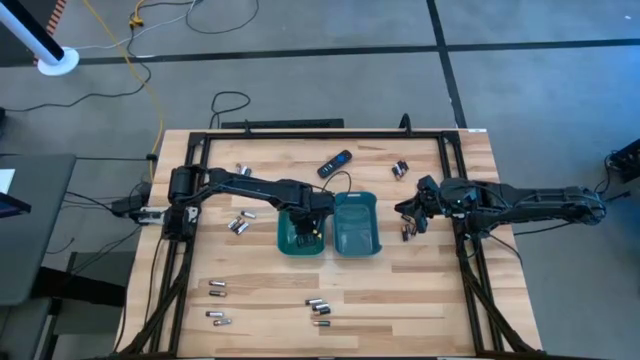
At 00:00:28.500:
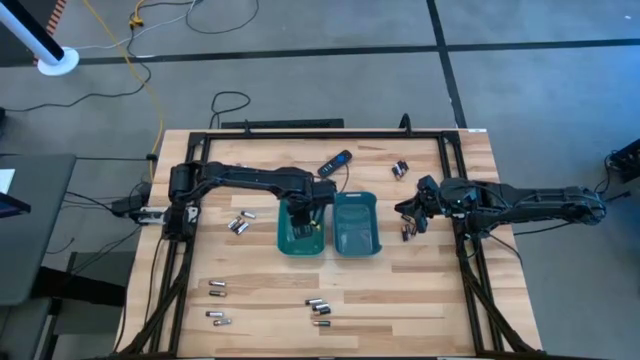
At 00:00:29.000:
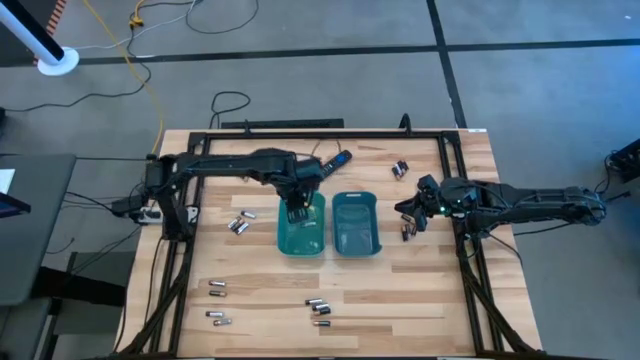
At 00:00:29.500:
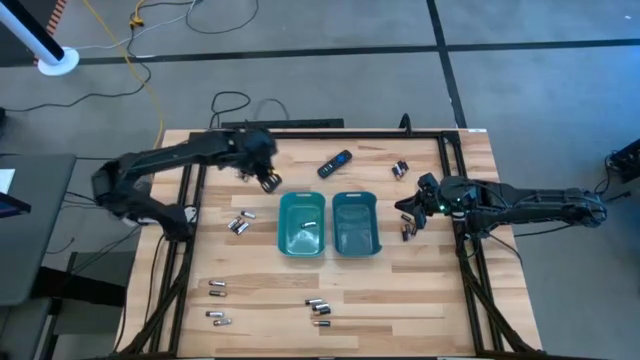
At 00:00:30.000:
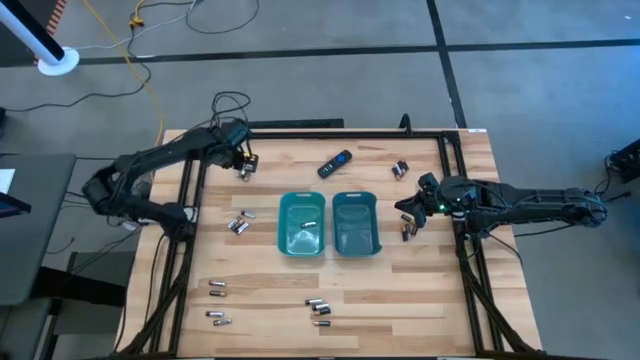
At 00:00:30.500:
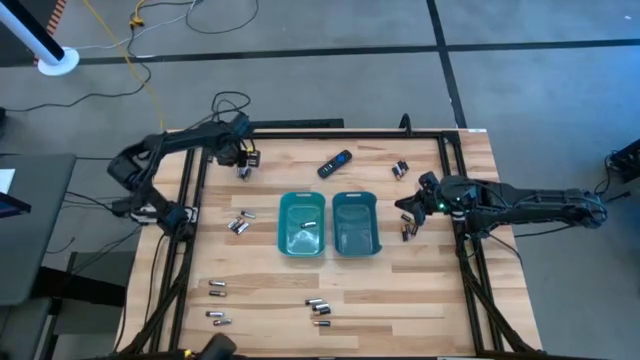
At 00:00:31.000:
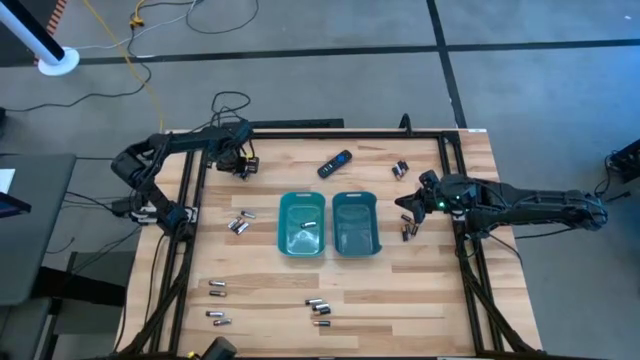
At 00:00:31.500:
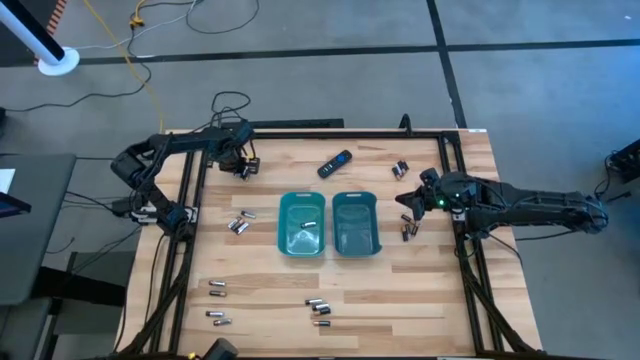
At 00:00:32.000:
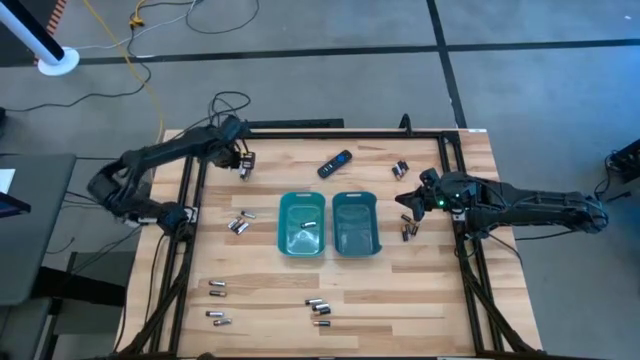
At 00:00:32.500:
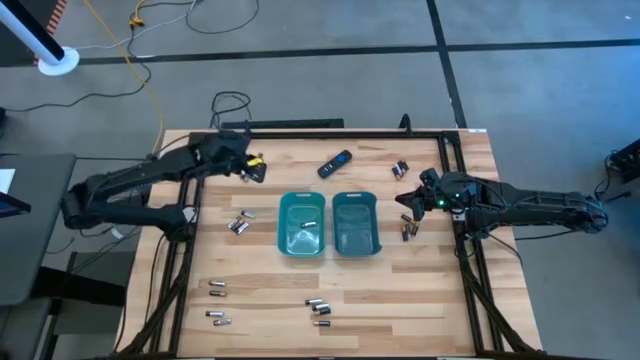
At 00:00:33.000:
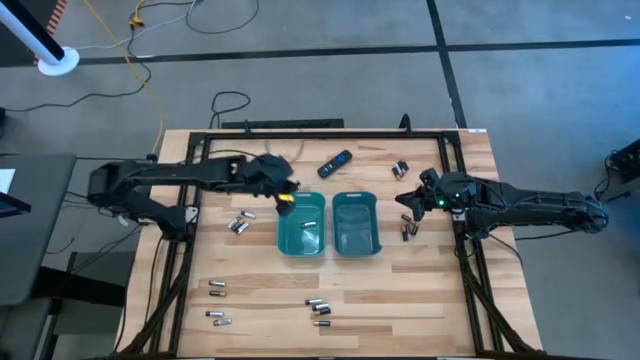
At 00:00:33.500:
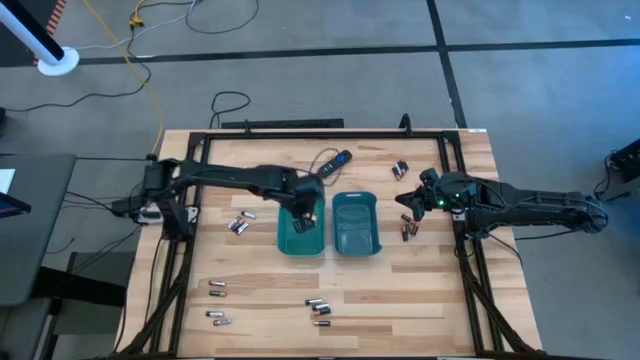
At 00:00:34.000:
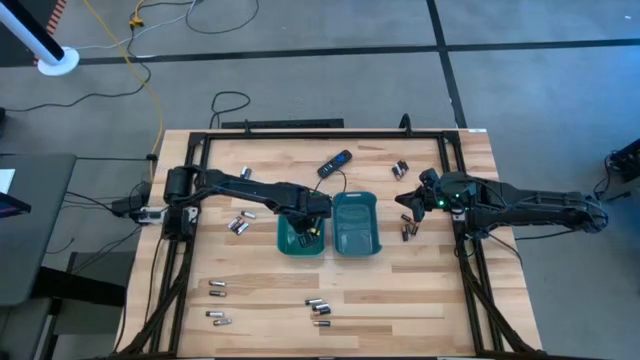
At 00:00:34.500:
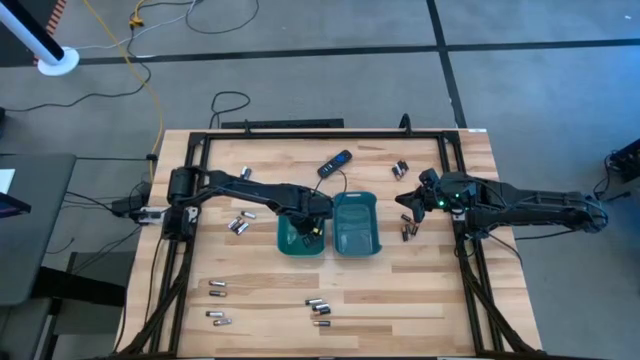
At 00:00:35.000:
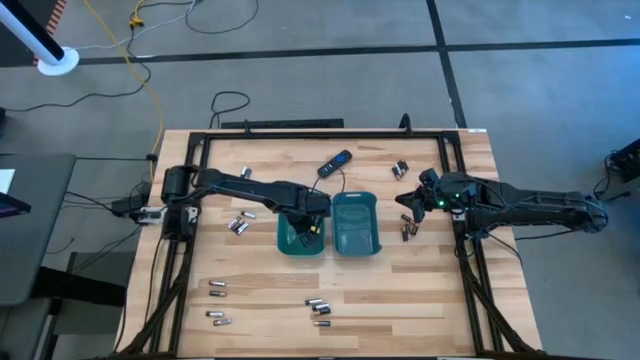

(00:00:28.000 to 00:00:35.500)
Task: Sort batteries
Put the silver and black battery into the green bin

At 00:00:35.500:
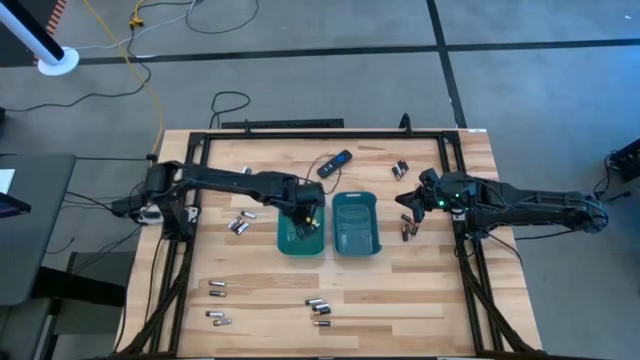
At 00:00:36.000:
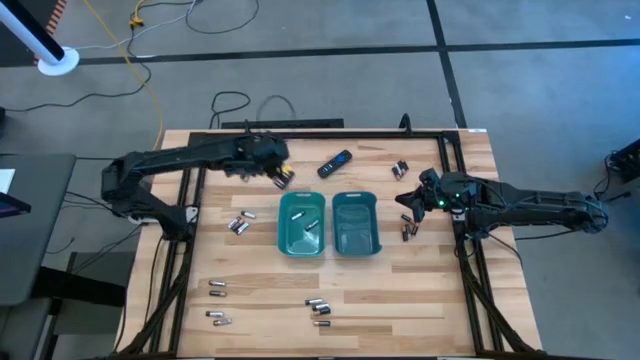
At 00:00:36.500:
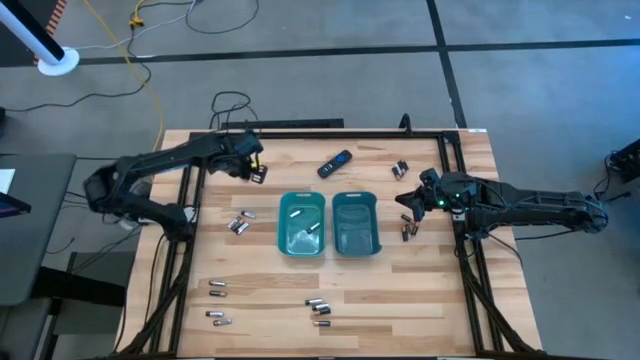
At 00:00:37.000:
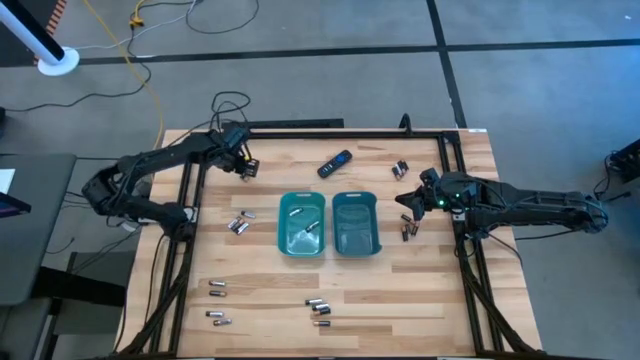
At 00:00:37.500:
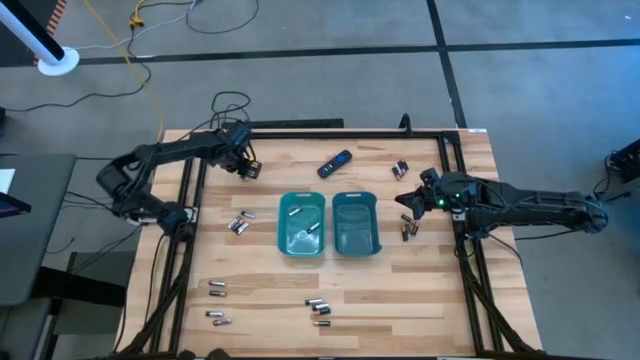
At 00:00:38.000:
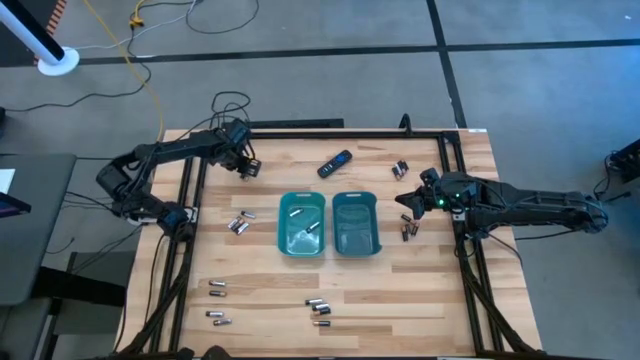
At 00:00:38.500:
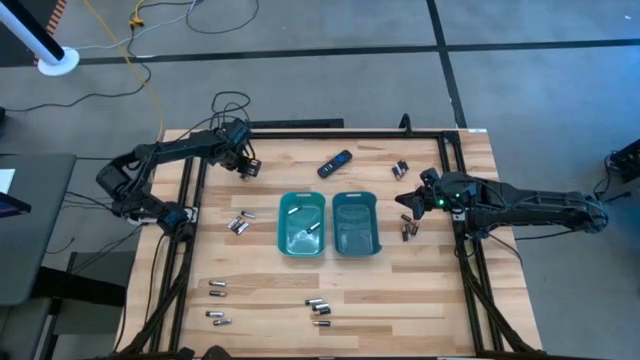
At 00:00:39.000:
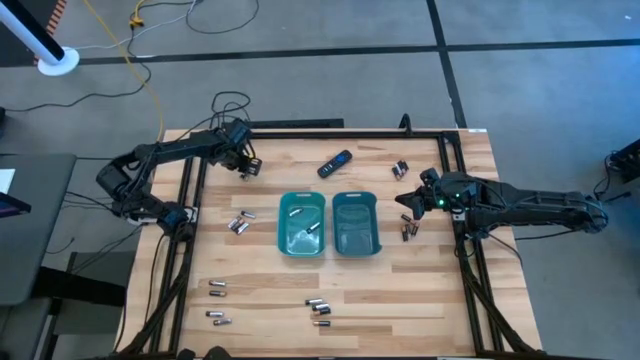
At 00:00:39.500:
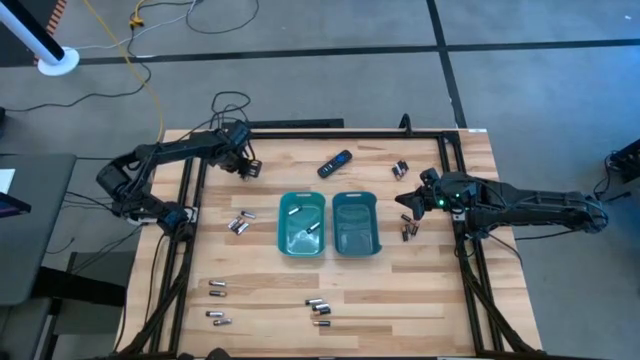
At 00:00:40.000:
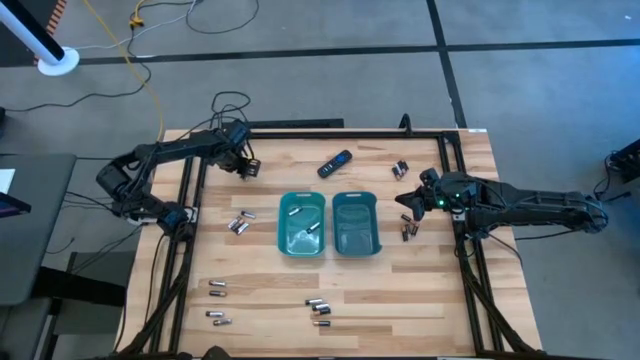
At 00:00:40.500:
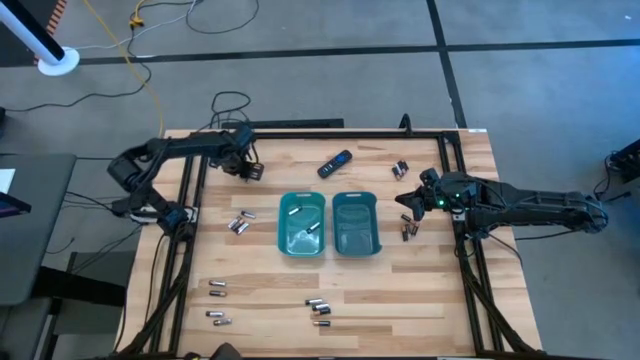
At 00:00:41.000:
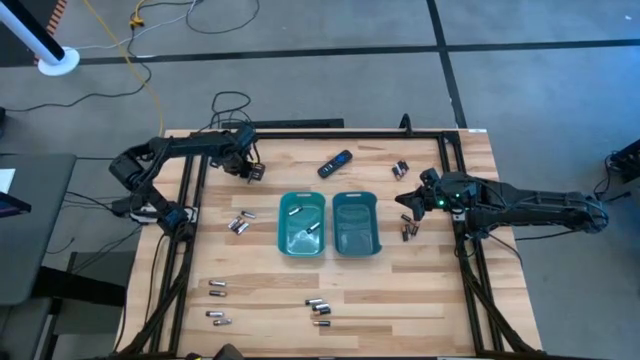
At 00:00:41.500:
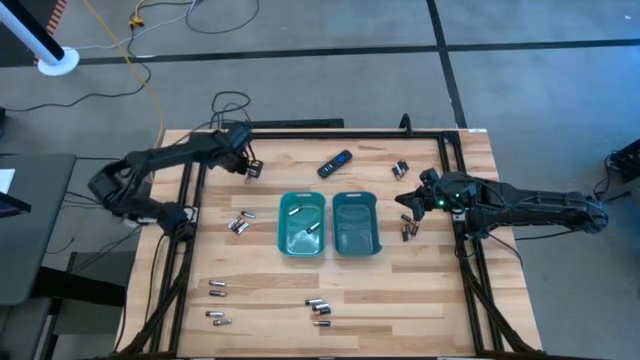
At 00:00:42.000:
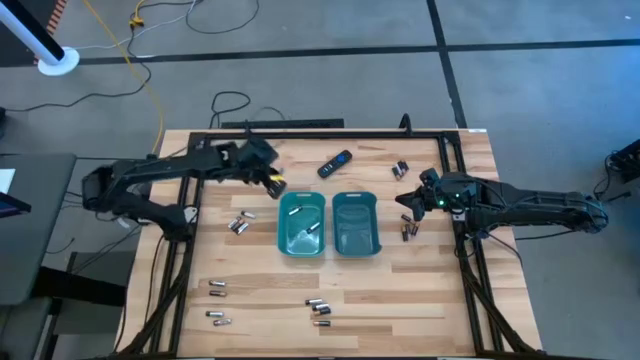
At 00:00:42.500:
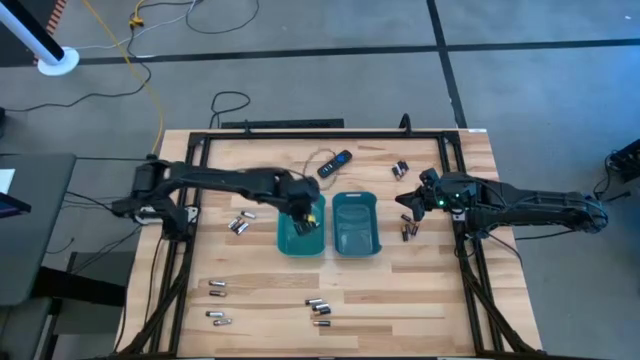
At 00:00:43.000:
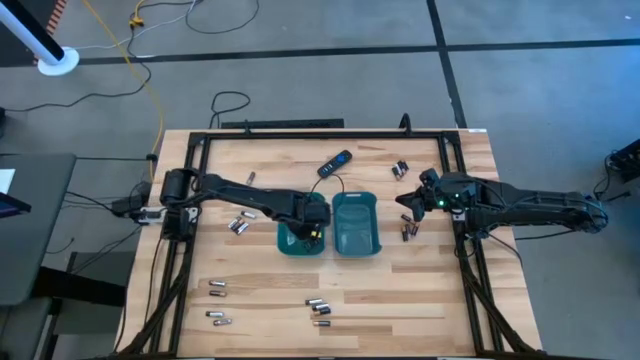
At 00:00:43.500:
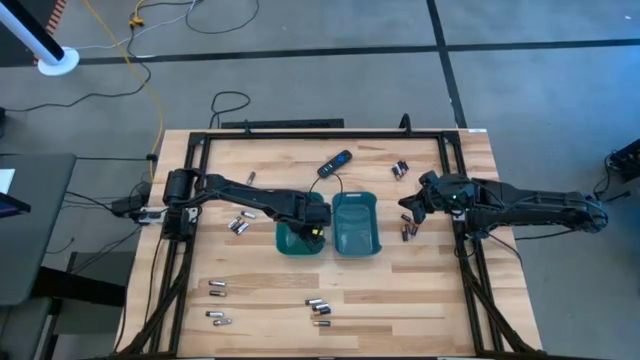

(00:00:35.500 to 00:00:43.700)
Put the silver and black battery into the green bin

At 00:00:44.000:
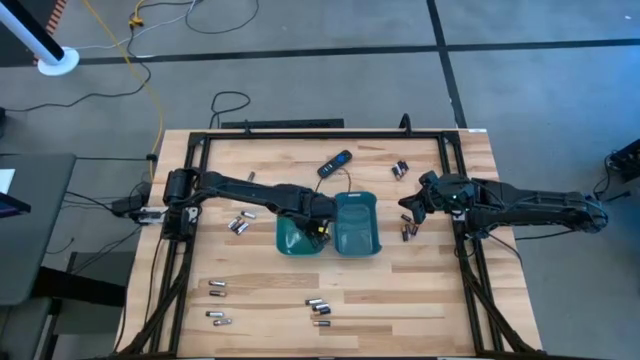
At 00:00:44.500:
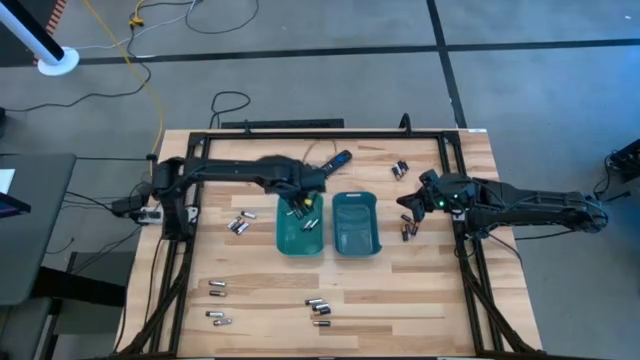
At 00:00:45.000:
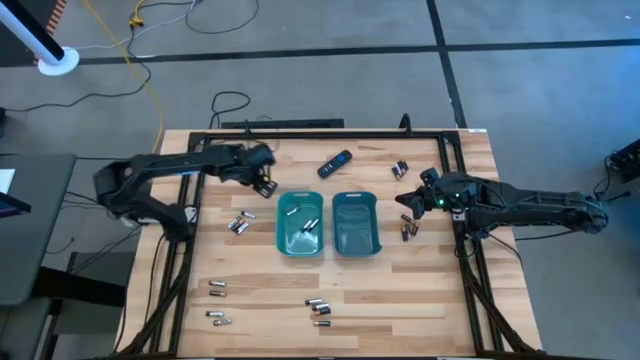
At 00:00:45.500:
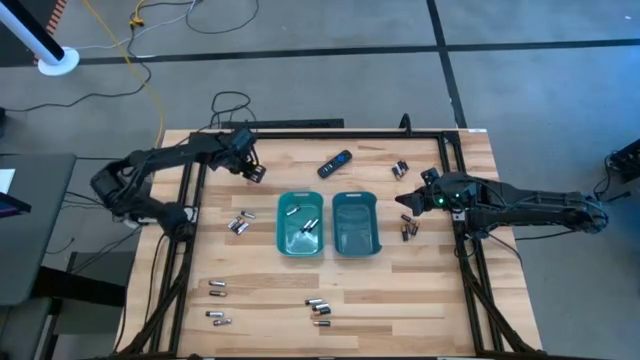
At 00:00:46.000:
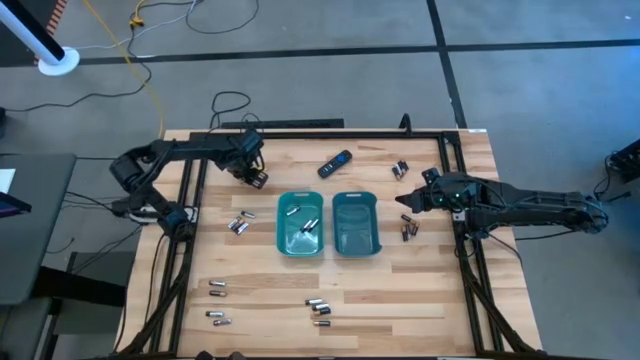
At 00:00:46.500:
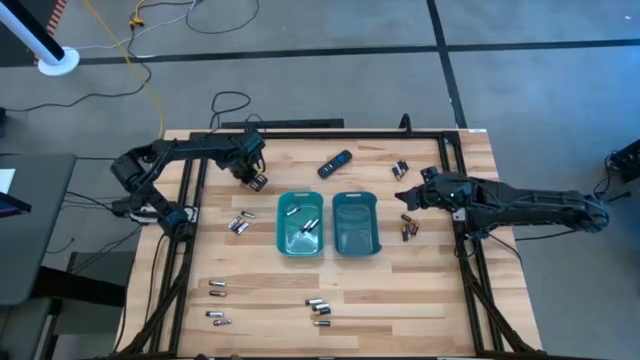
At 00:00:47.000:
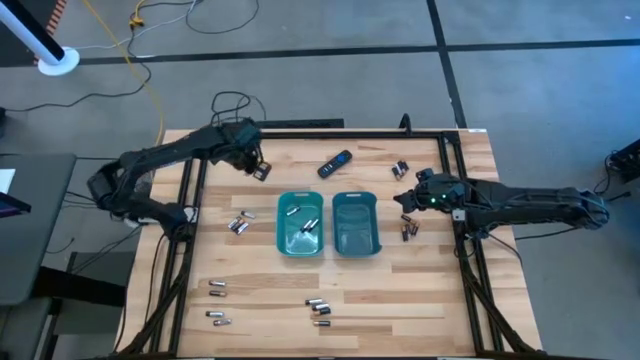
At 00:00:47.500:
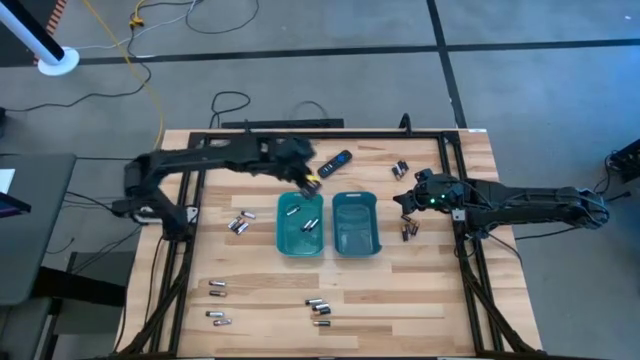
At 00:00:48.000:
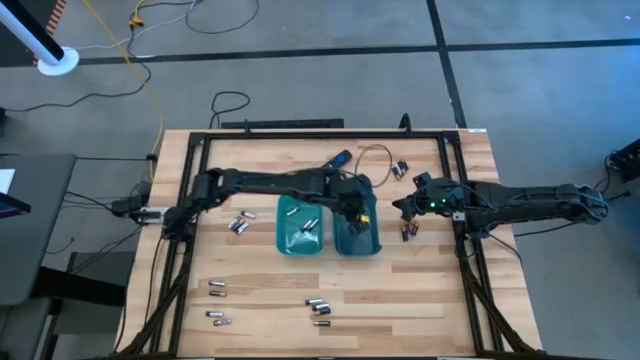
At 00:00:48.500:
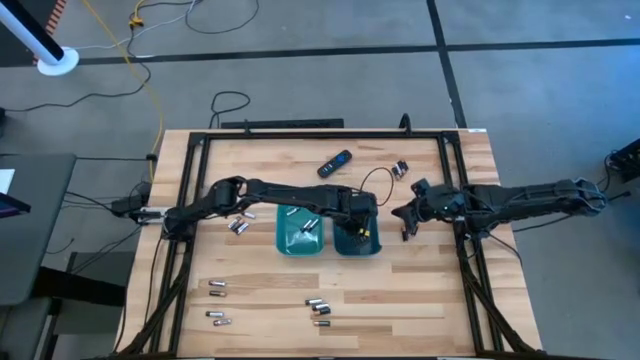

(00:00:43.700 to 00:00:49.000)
Put the copper and black battery into the blue bin
